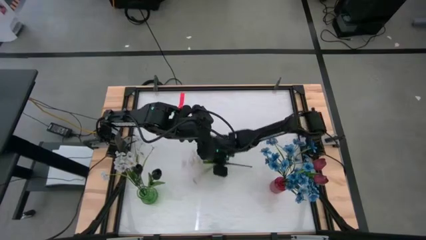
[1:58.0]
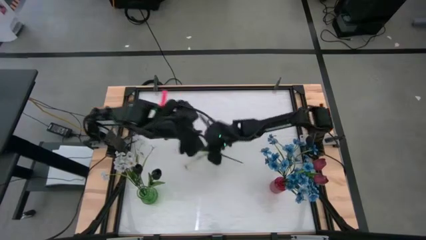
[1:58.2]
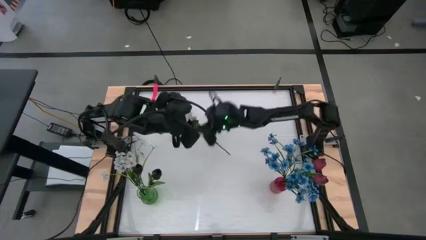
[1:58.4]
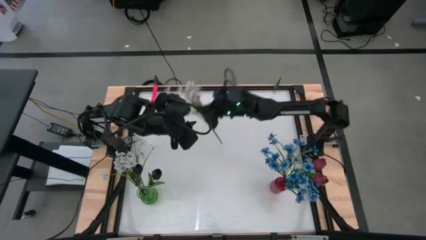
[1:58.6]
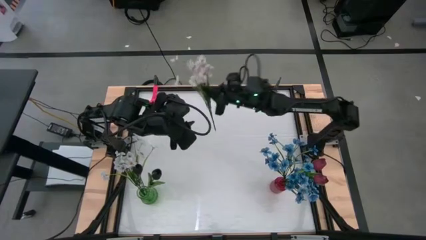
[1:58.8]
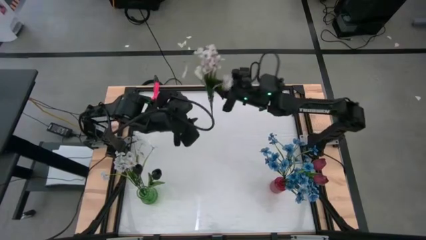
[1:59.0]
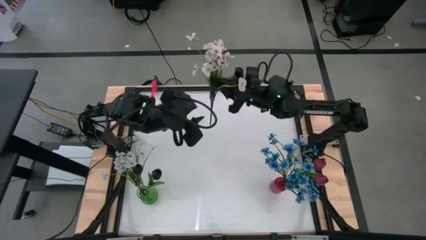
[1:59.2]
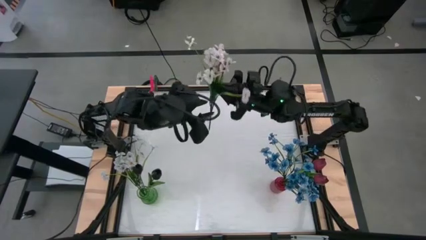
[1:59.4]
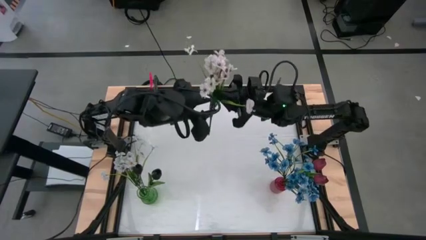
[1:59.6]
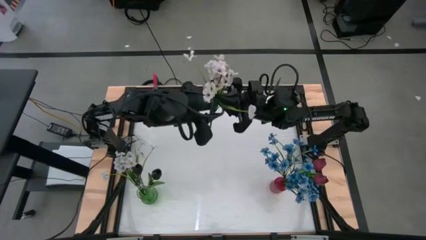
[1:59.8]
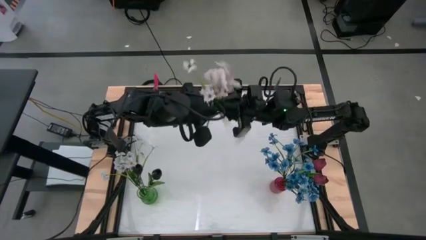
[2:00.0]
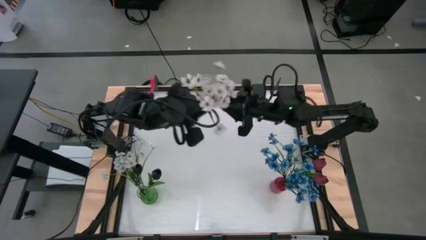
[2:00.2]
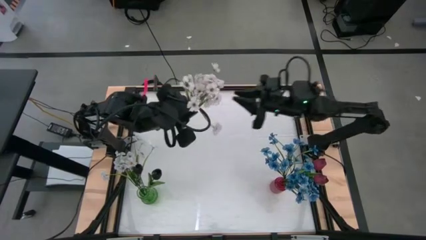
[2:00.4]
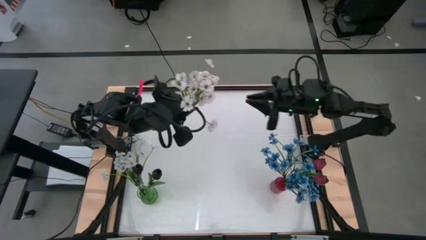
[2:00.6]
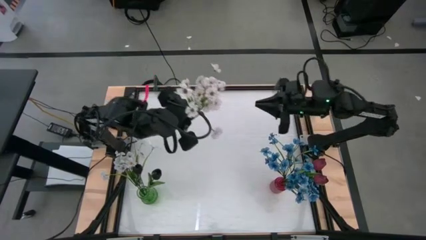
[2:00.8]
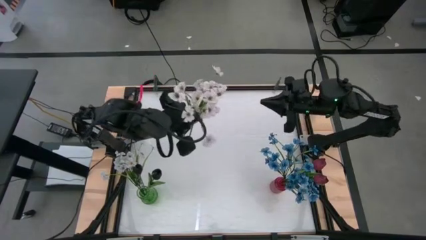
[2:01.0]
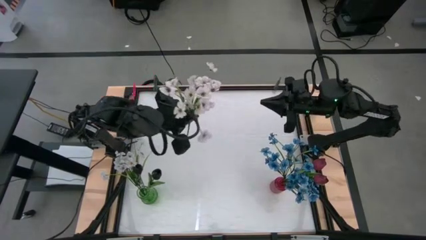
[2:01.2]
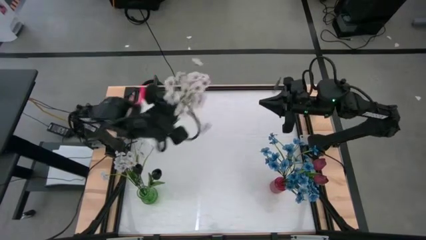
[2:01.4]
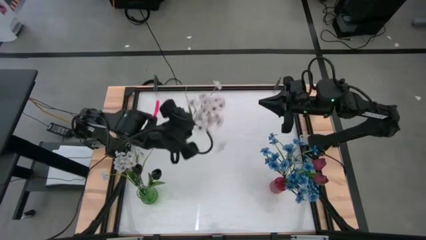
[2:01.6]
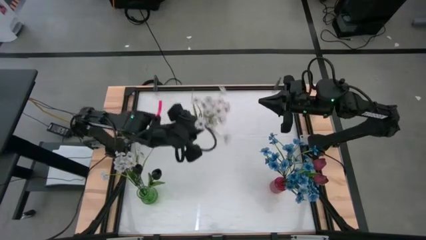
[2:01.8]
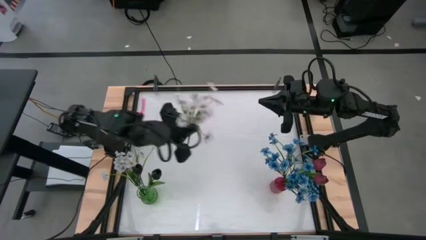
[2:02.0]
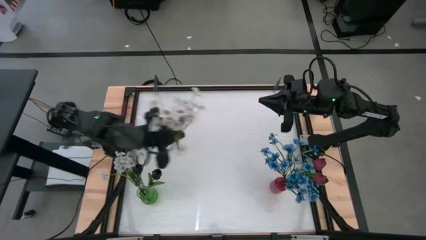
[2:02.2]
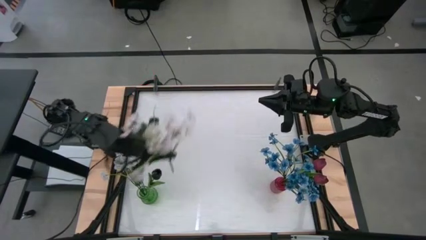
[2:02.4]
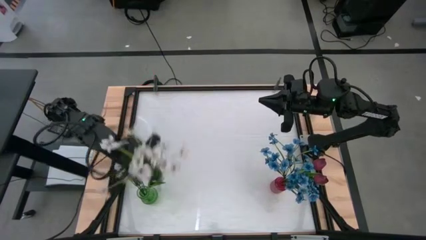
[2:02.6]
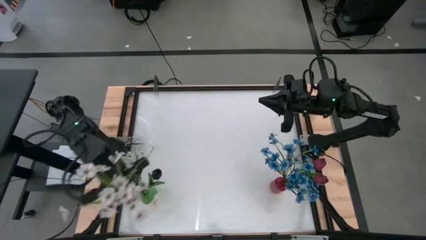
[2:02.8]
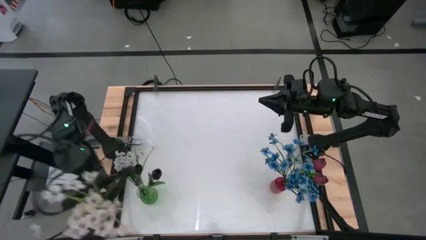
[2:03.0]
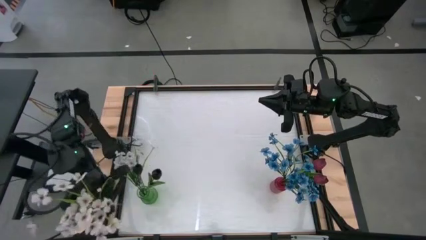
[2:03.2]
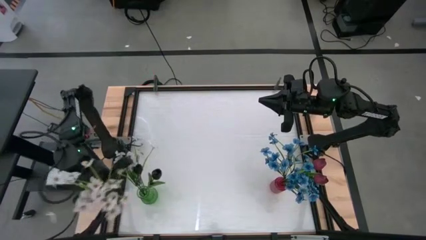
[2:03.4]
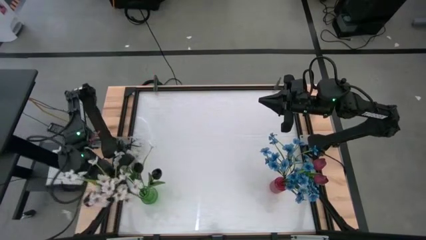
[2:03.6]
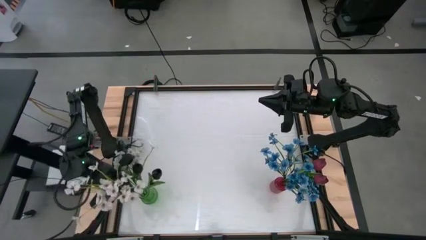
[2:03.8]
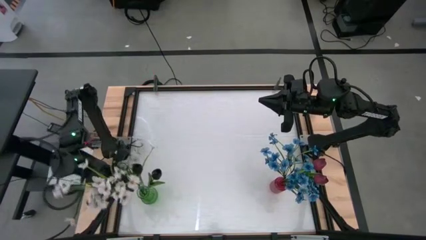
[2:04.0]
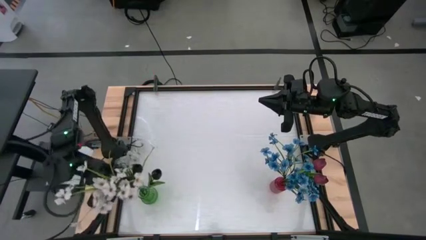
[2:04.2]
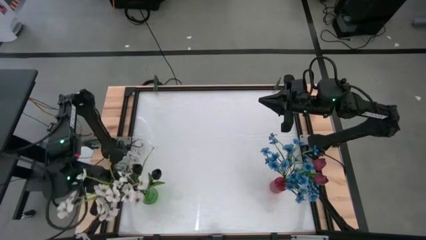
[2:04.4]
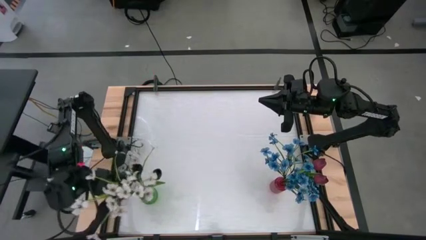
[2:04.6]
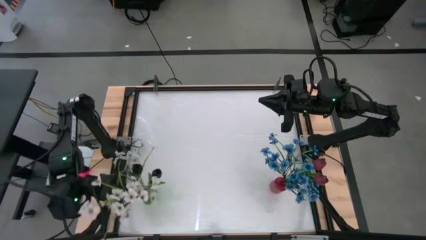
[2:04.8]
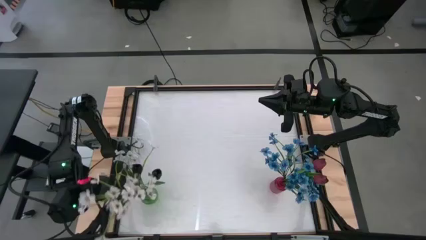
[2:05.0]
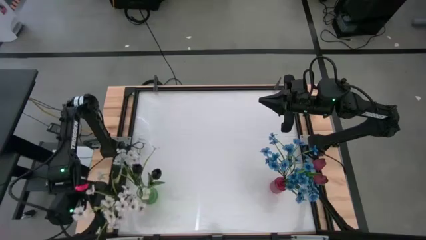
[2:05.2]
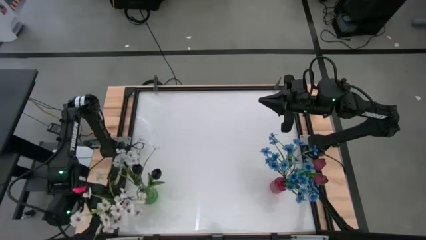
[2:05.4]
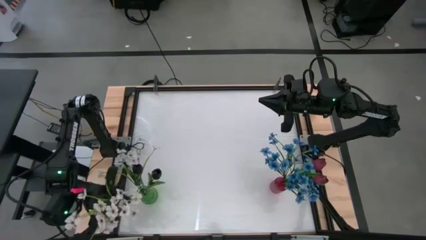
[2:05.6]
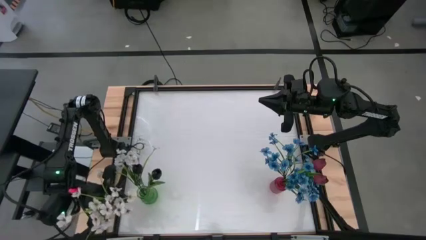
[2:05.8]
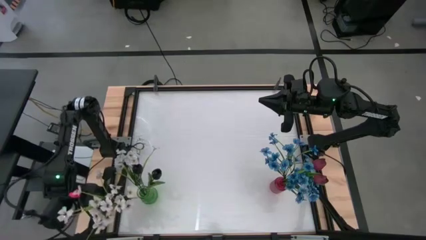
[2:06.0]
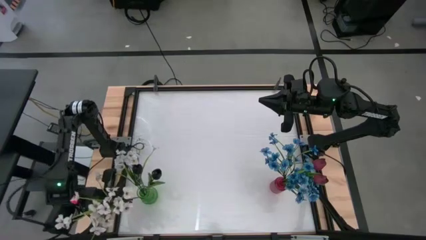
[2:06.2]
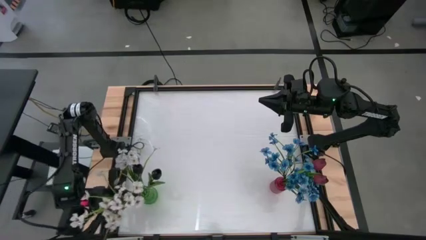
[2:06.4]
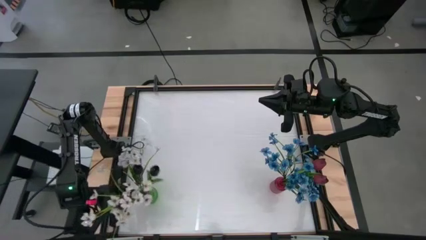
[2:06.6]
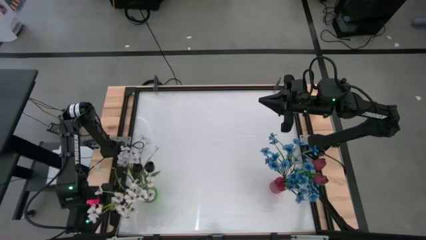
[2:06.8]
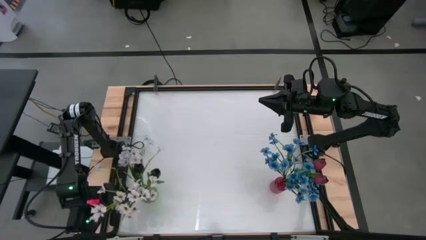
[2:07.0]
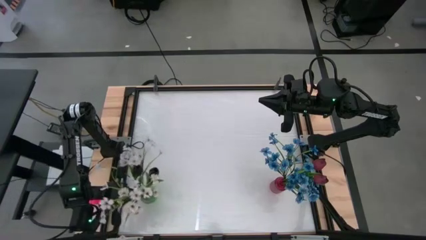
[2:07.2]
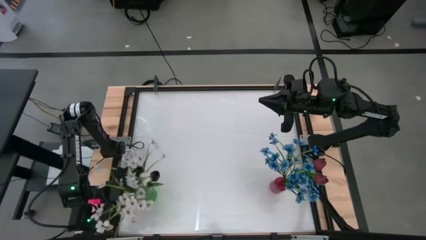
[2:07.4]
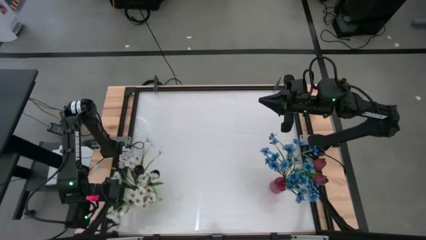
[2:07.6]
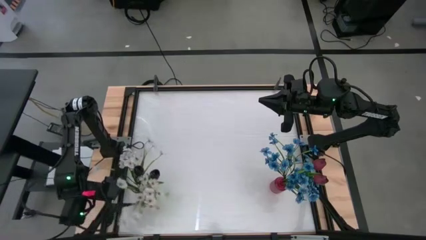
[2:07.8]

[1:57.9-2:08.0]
Task: Sort flowers into vase by color
Put the white flowers into the green flower vase

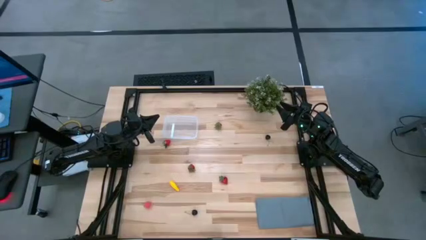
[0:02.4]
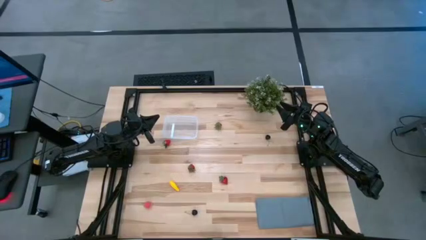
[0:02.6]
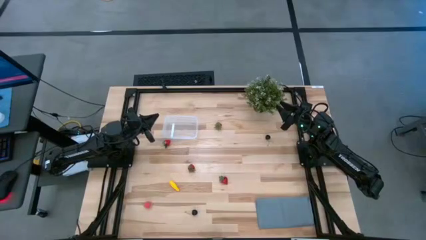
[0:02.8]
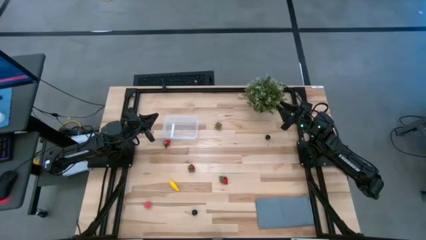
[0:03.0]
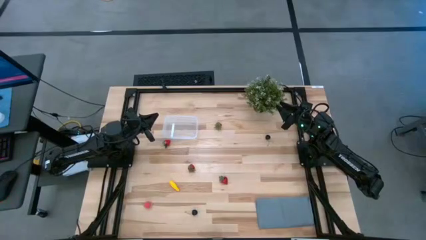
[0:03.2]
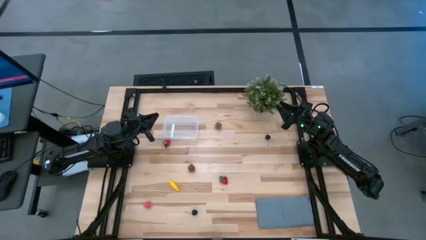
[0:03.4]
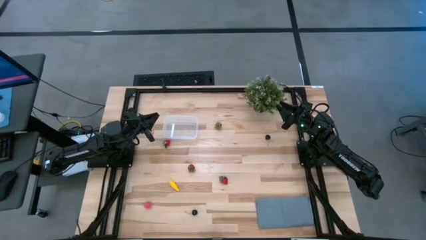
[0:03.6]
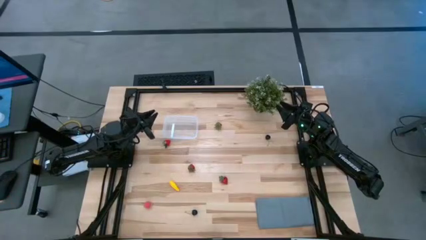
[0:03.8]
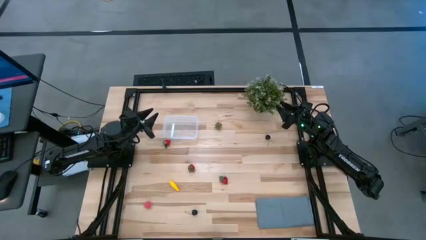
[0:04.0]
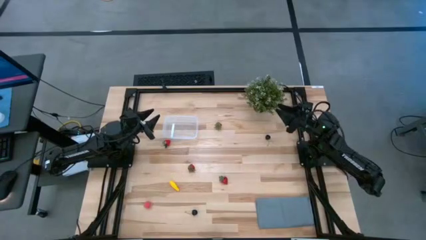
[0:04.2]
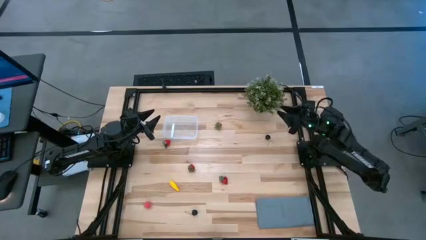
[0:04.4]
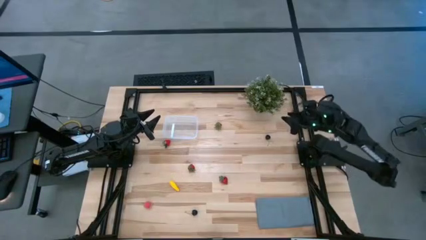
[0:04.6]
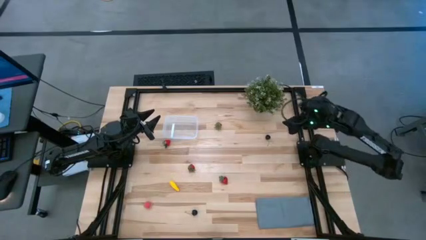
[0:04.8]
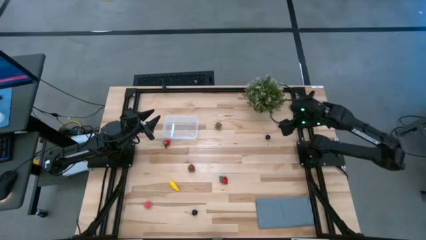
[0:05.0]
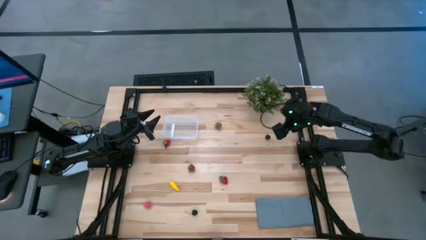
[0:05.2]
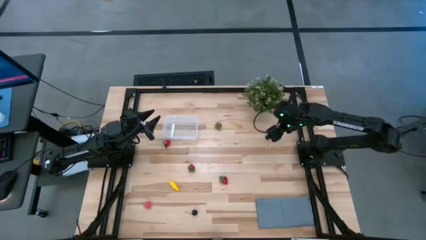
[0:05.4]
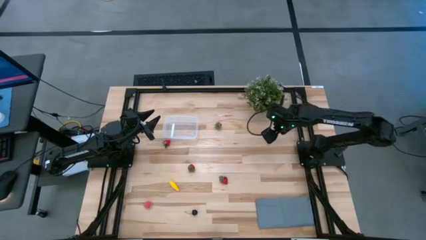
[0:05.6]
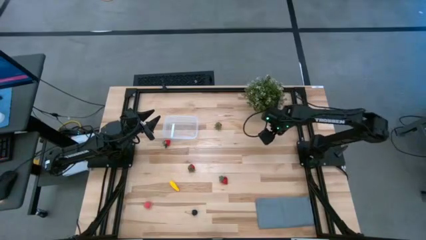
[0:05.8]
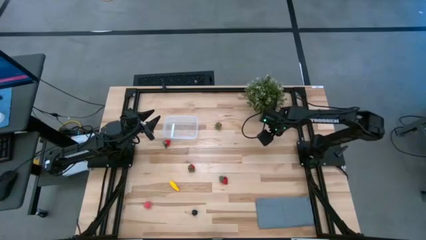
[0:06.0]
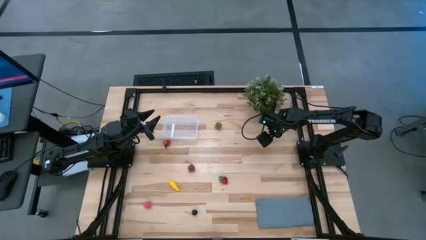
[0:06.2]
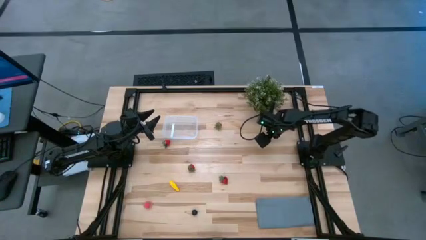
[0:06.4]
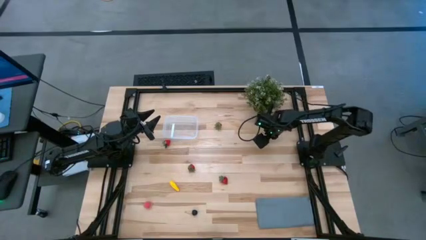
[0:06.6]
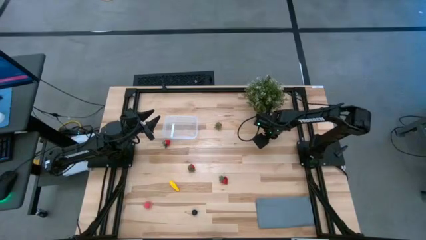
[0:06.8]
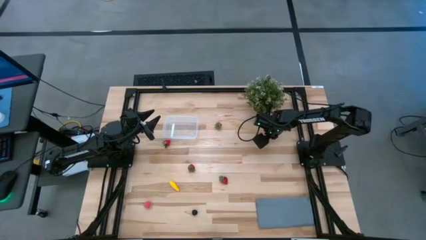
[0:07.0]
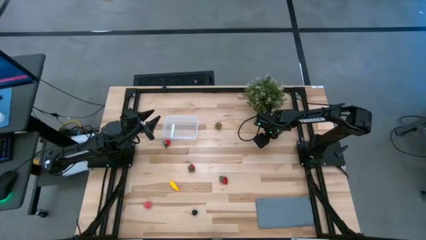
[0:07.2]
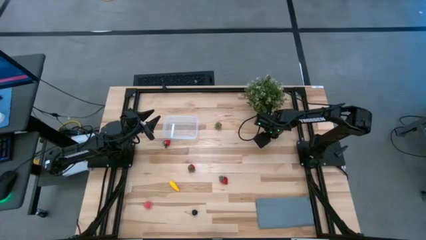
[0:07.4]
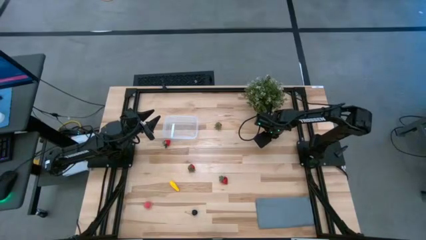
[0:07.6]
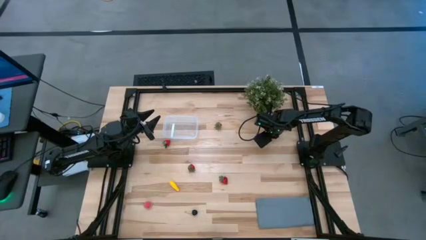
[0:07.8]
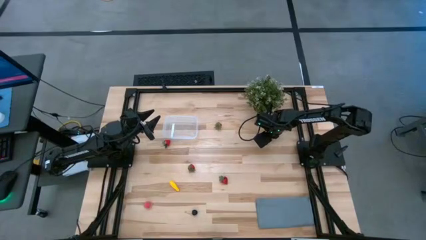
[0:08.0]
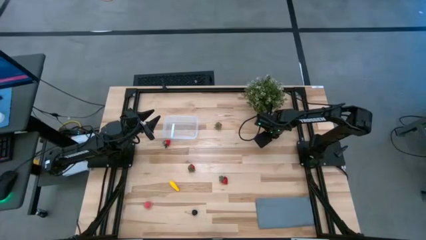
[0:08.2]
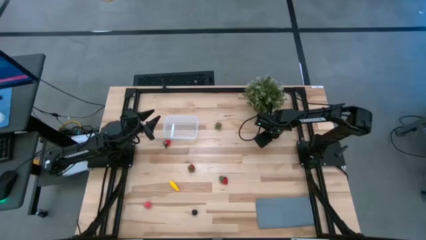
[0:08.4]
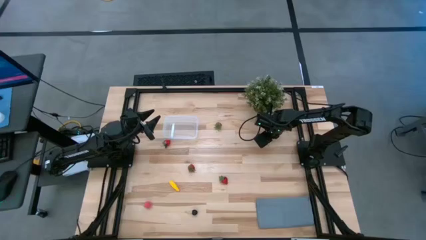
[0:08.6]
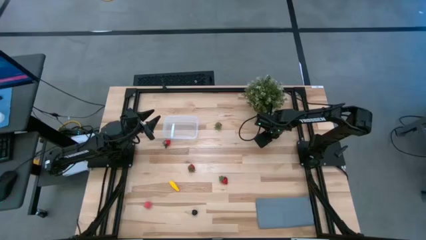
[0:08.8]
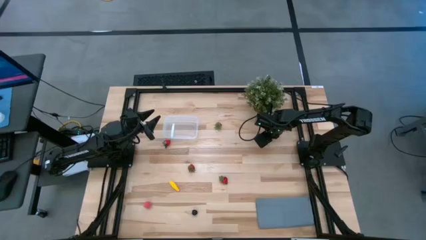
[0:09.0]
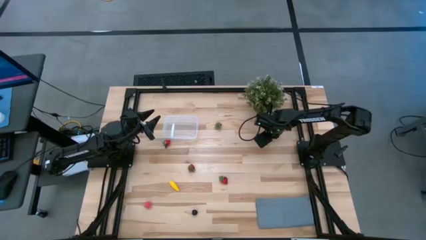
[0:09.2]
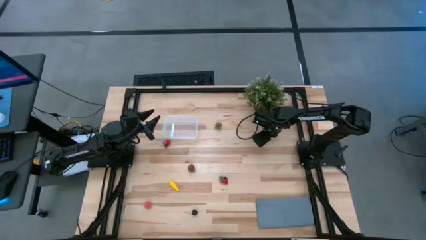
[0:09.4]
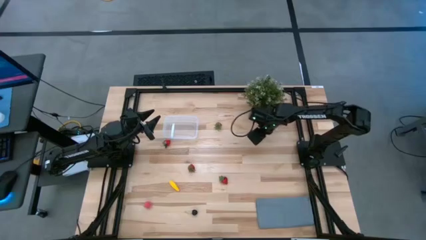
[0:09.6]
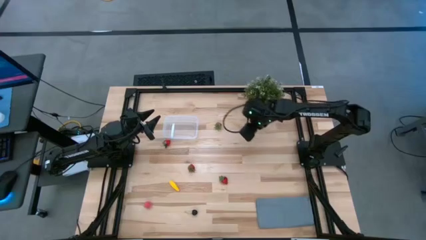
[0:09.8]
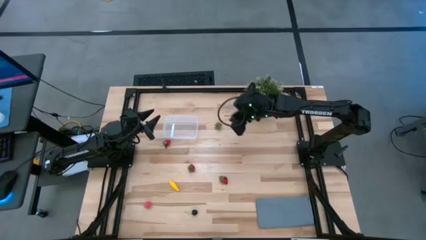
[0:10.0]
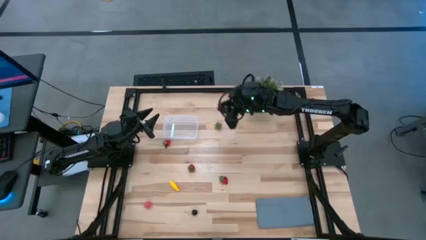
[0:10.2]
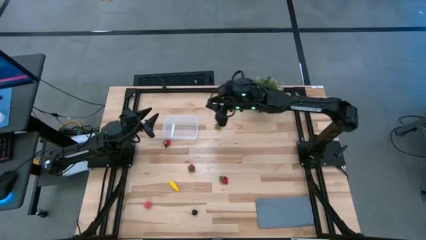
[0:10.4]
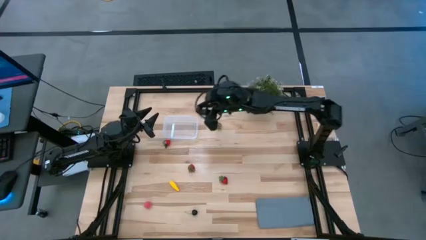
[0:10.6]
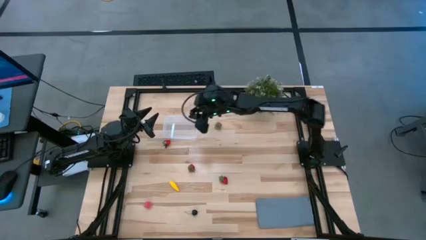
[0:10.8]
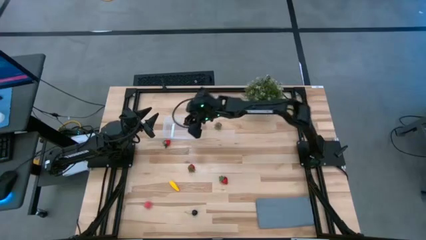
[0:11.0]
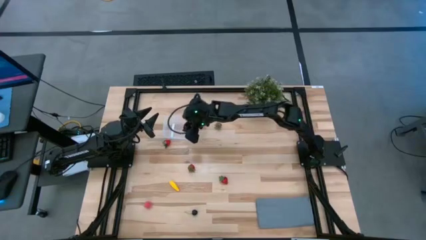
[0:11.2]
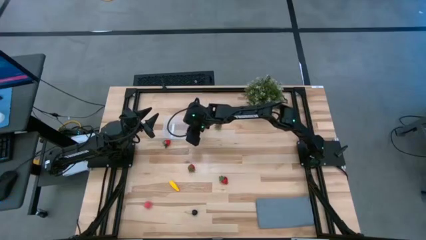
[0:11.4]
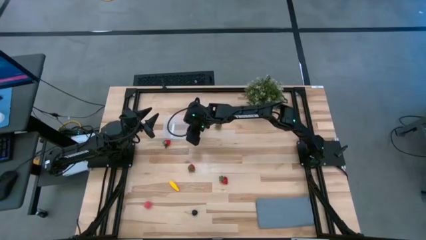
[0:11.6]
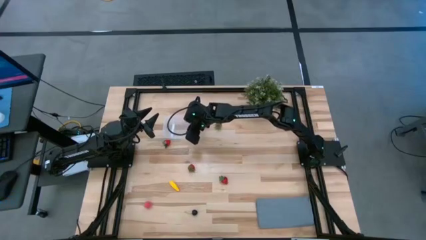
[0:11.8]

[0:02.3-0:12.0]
Task: Pick and placing Produce into tupperware
Put the top cherry into the transparent bin
